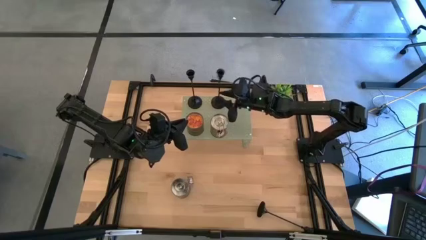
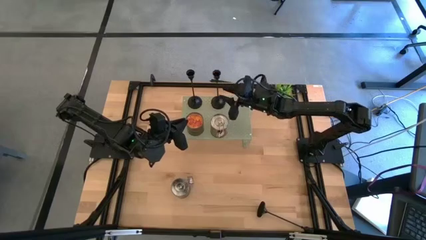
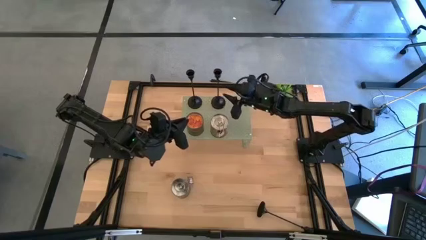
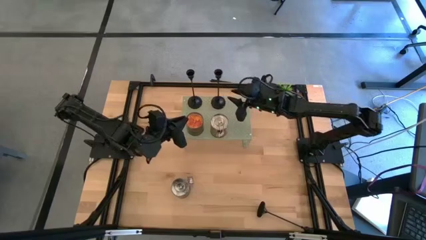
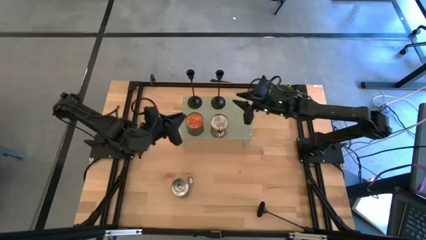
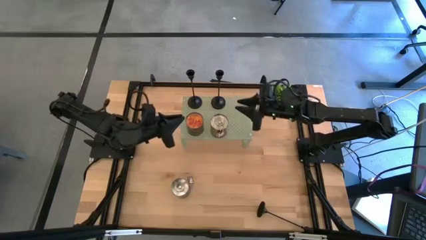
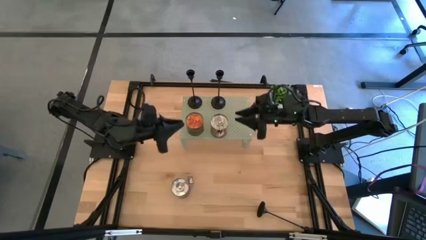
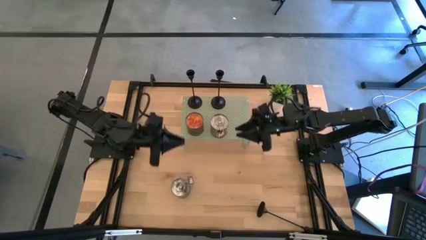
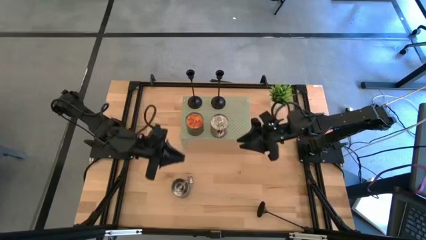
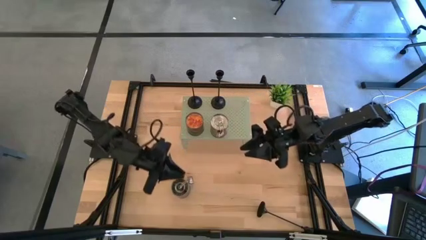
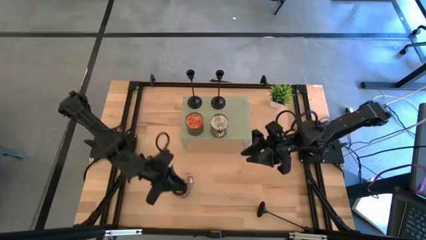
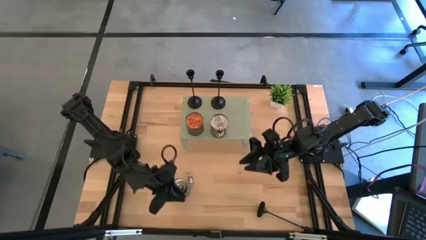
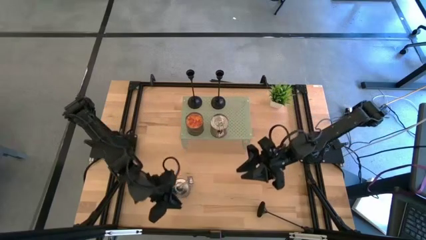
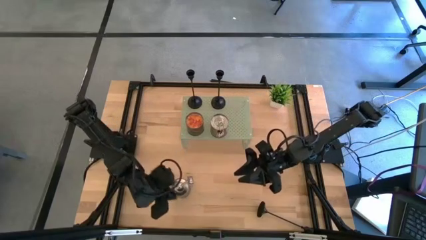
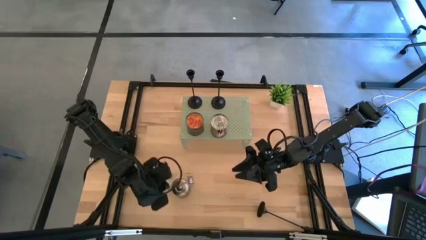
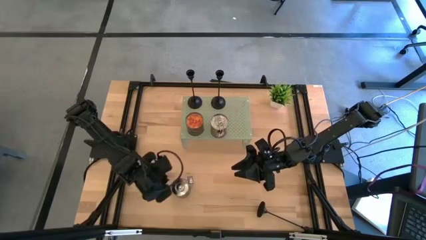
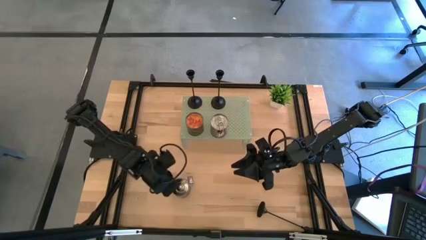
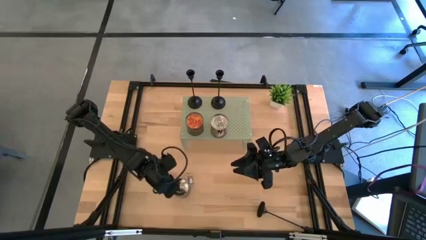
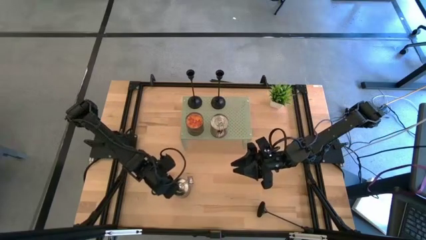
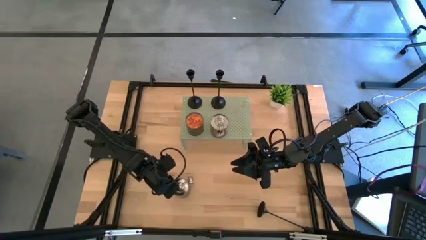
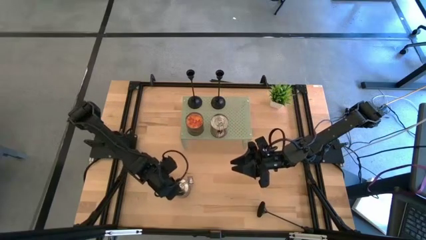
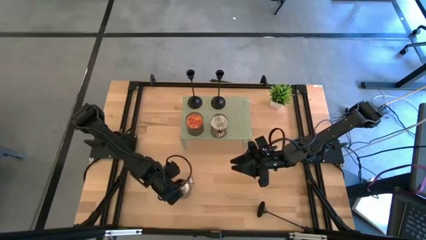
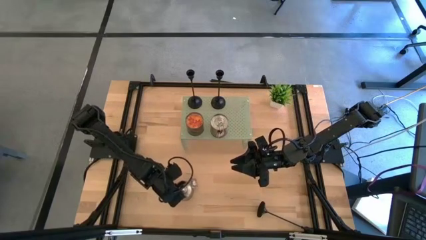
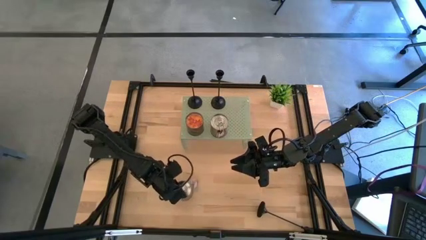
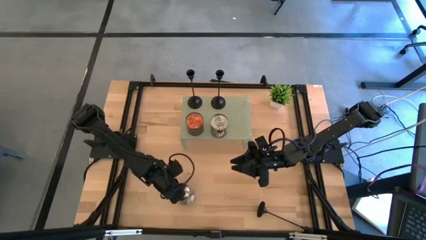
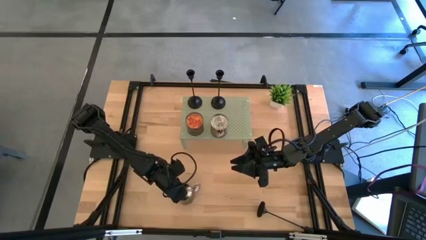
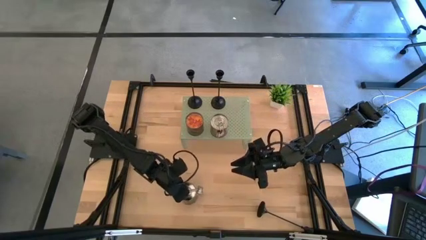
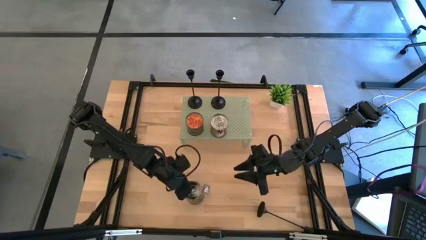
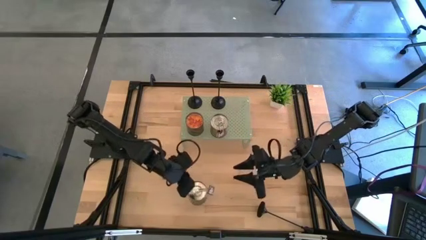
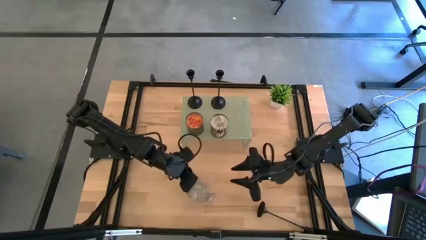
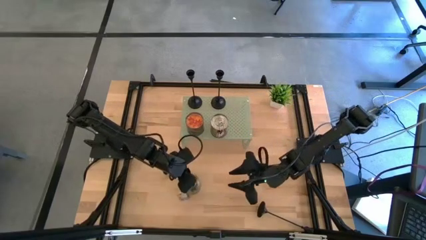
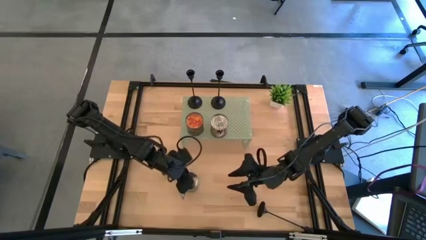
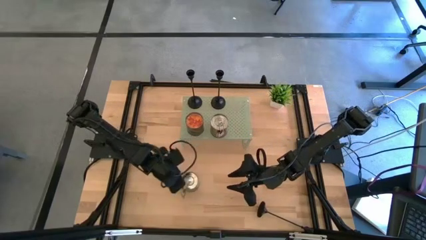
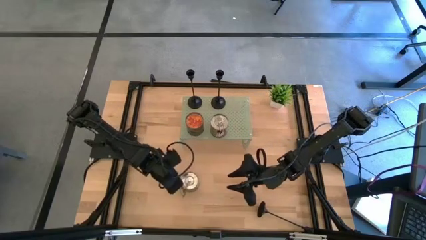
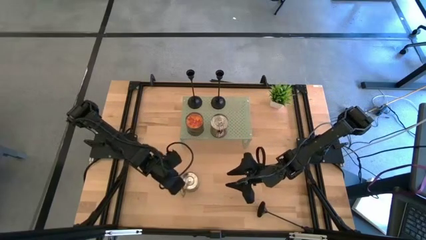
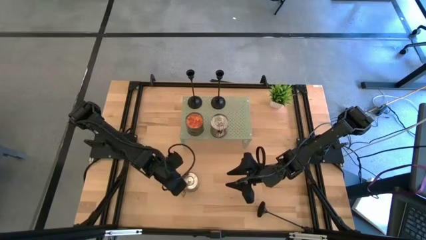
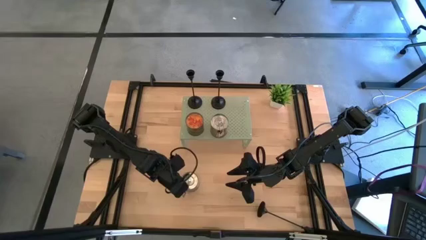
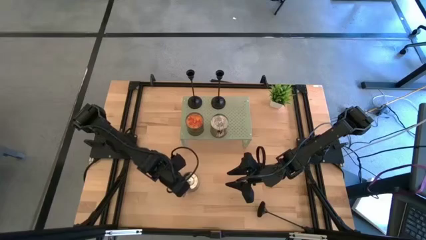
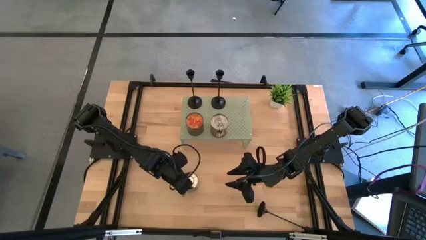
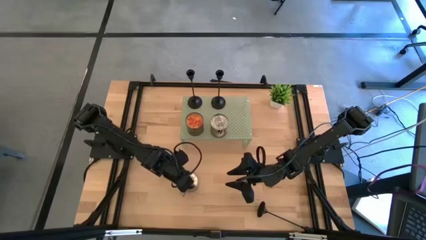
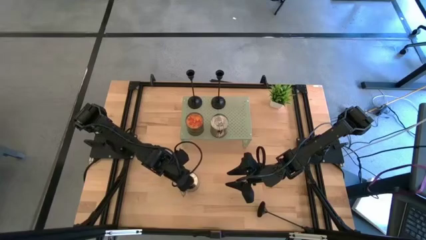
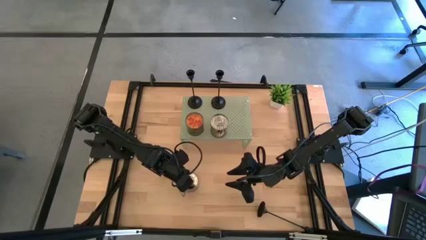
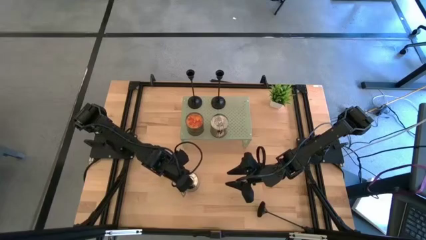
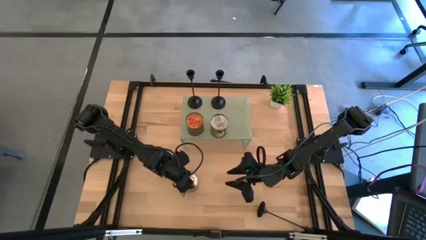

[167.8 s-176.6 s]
Task: Pick & Place candle stick holders
Put the brown scented candle on the shelf aligned with the other brown scented candle

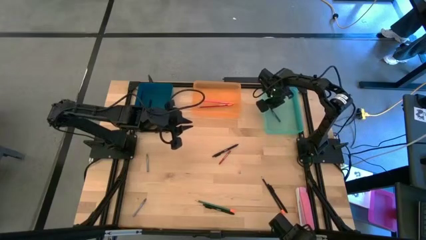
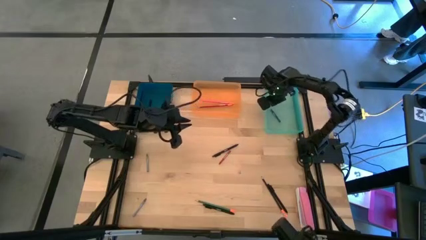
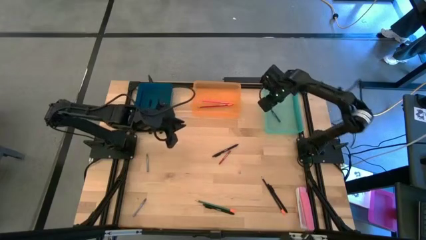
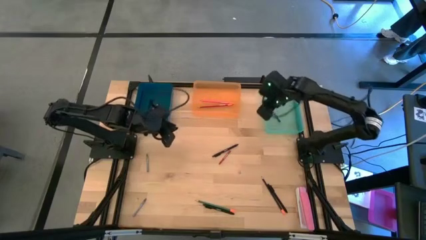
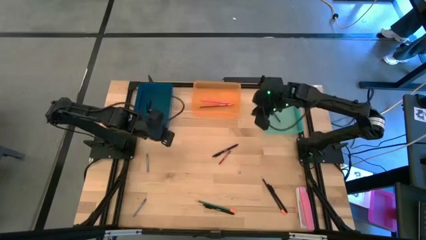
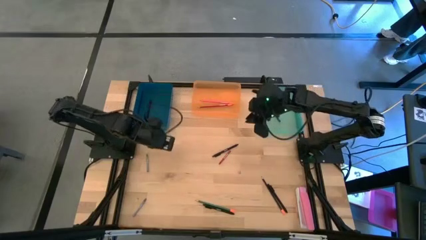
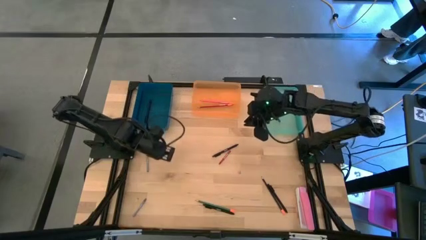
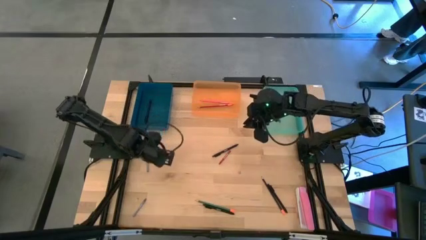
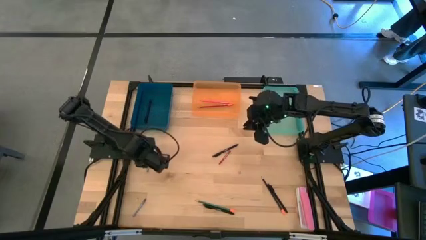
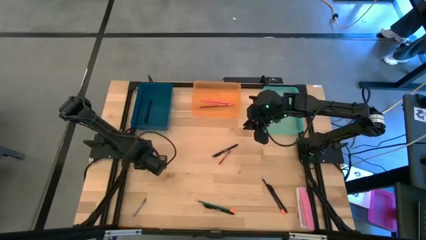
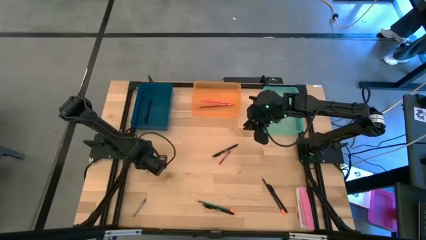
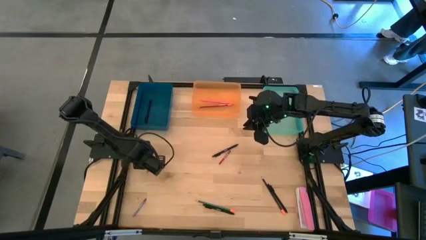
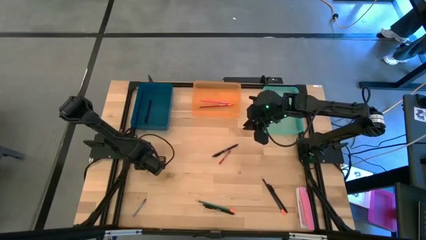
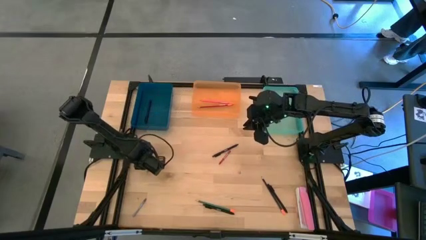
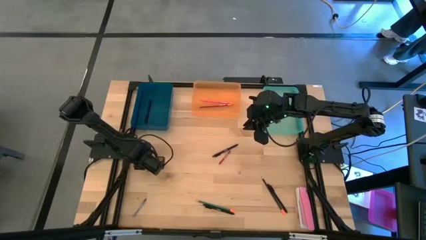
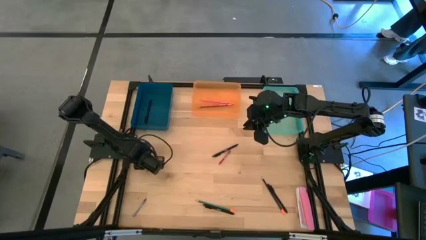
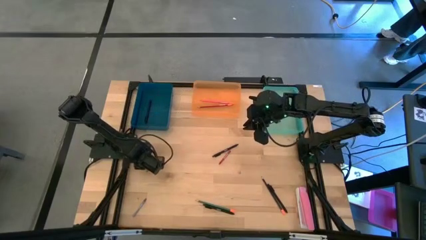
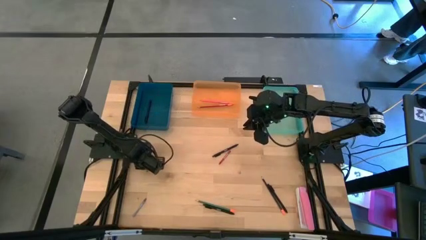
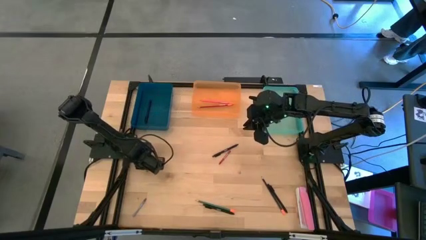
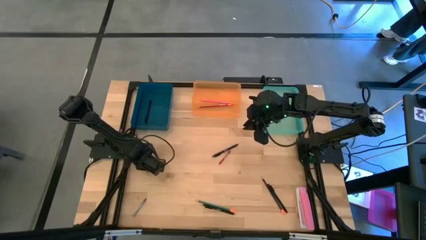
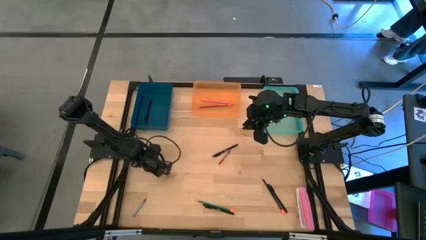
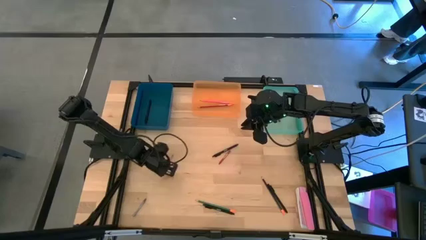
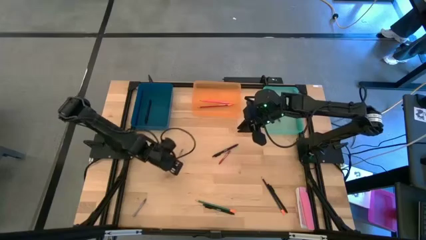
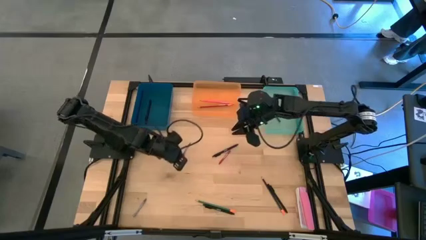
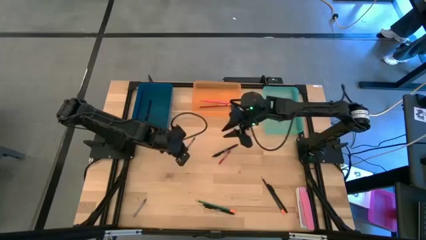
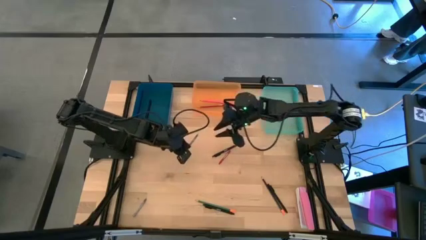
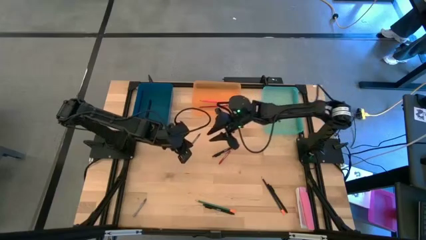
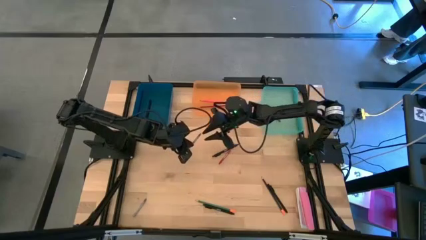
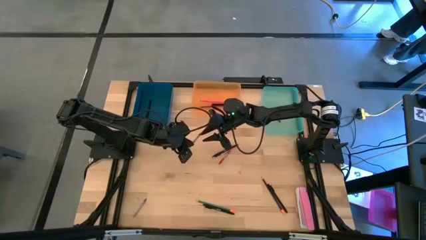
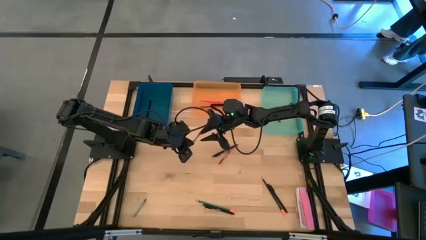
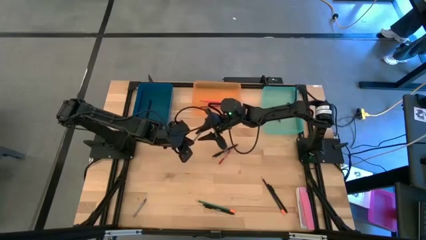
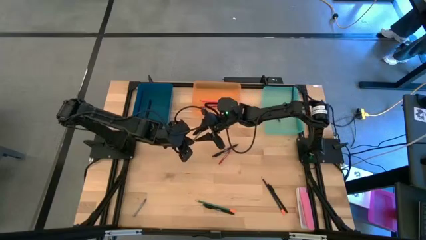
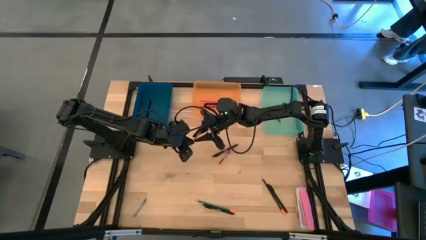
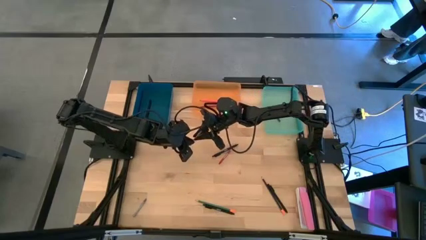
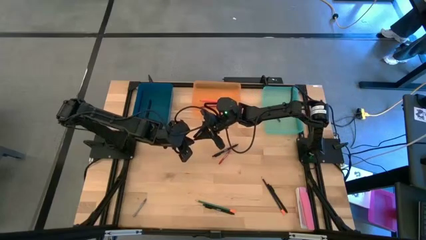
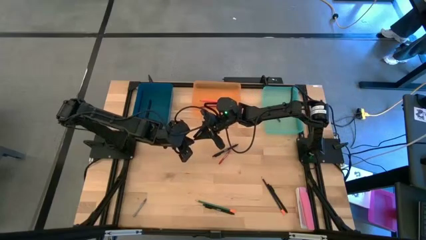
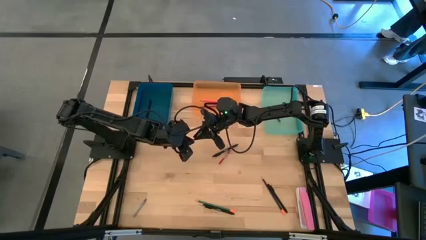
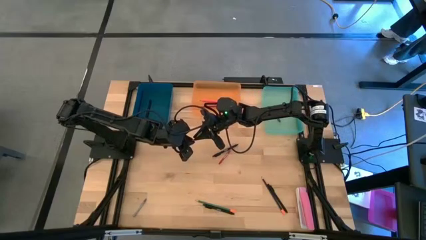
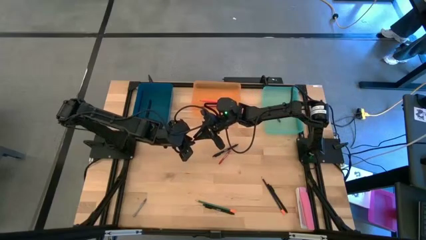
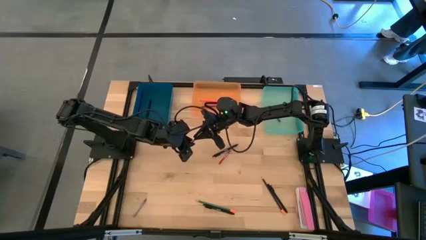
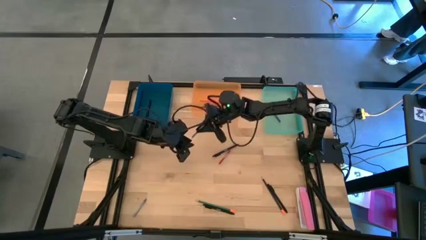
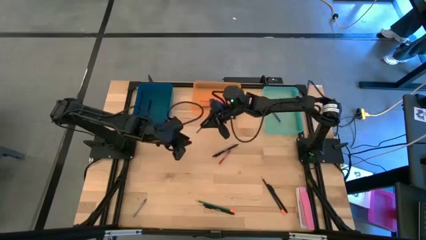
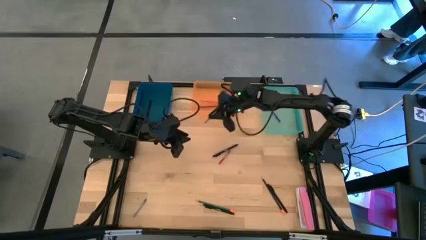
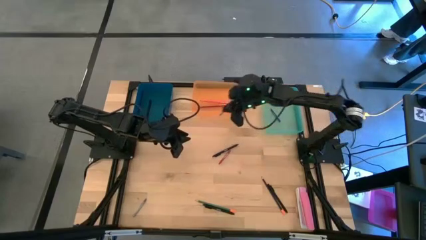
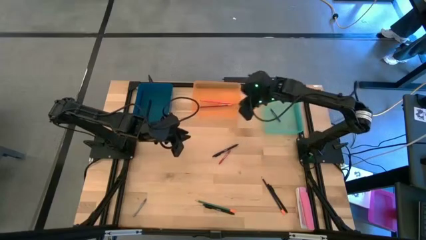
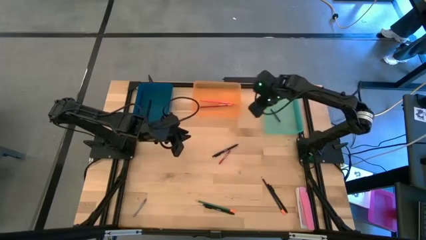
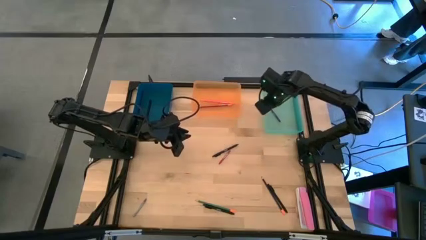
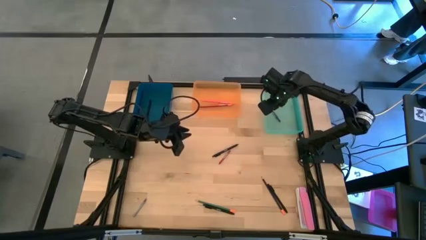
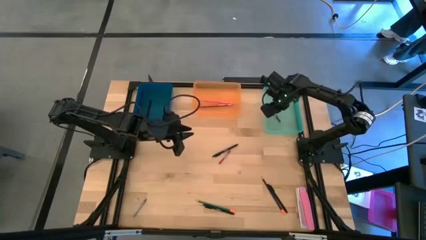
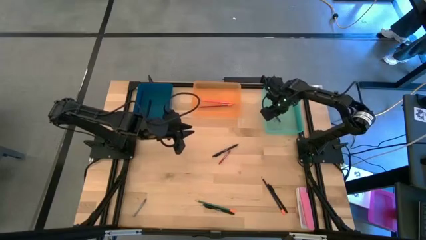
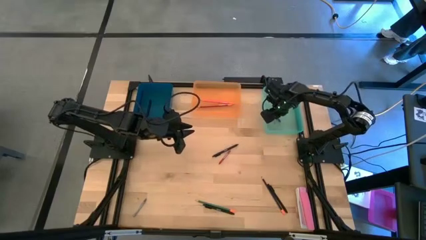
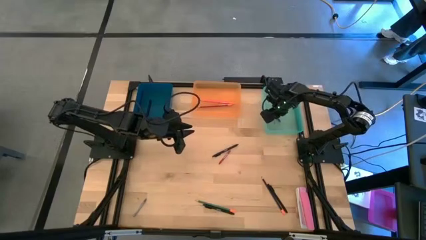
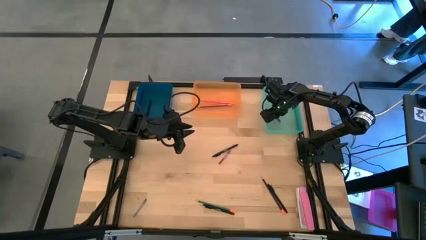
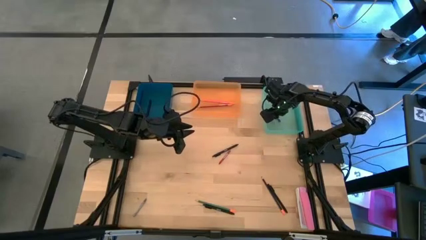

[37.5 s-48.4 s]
Task: Sort crayons/erasers/pens/pencils in bins
Put the gray crayon into the blue bin
